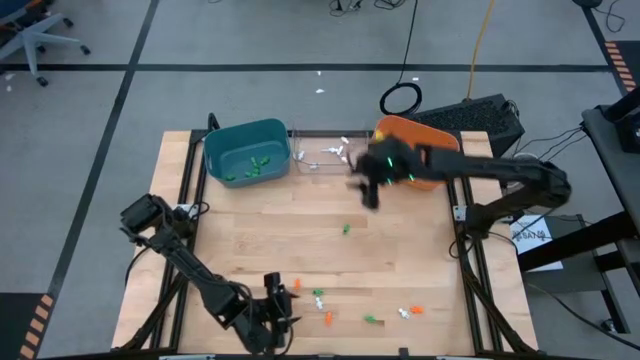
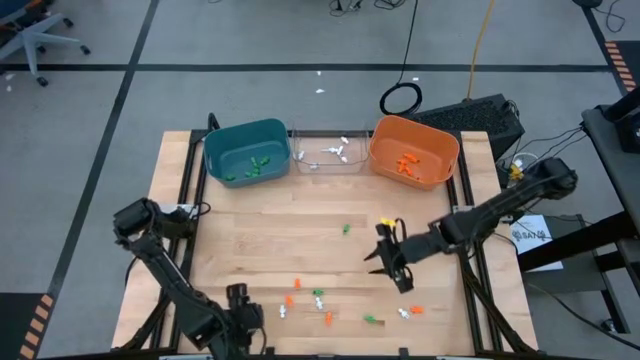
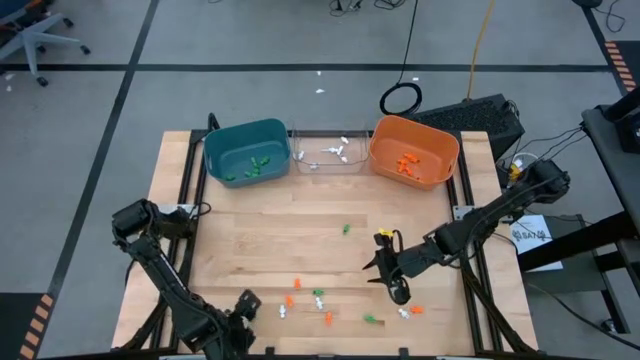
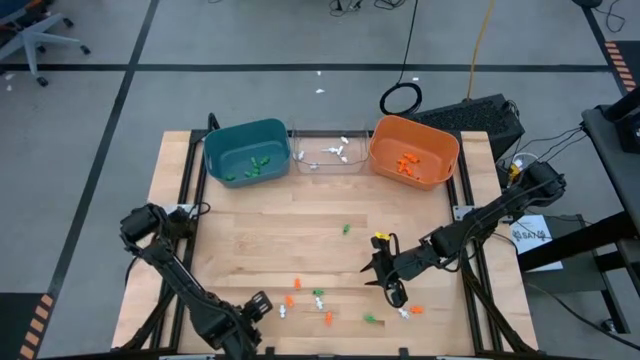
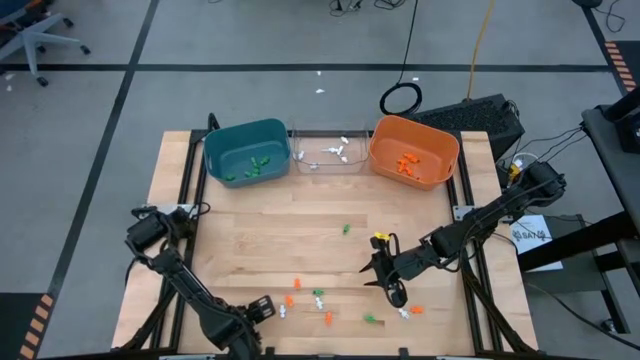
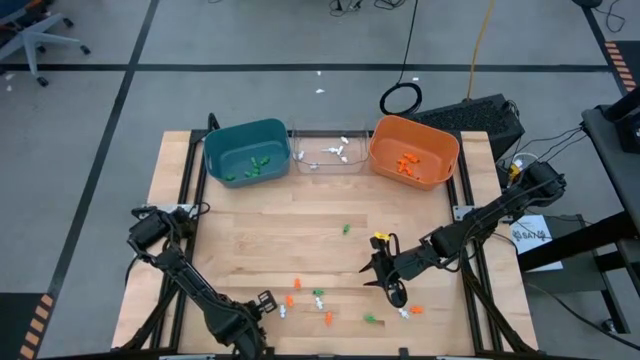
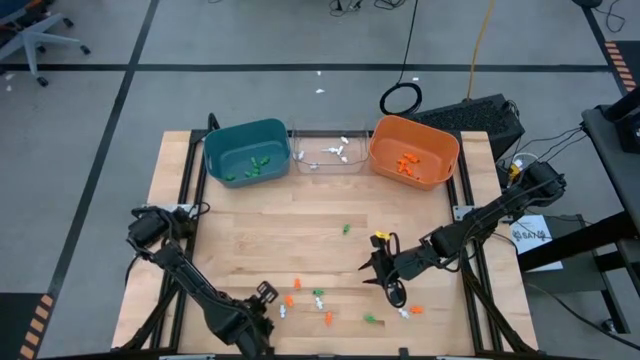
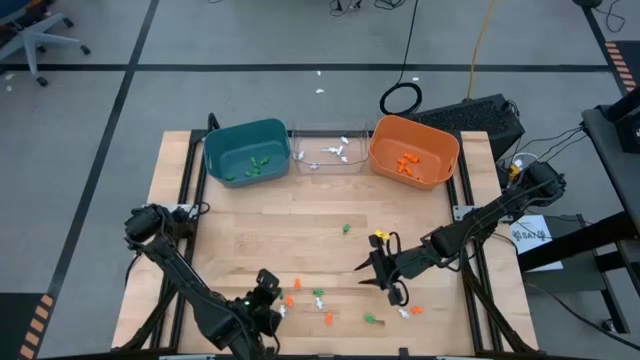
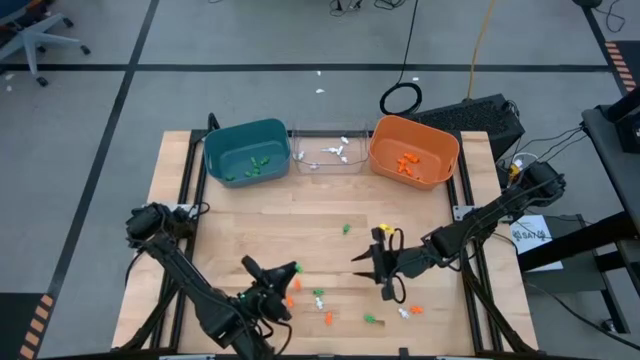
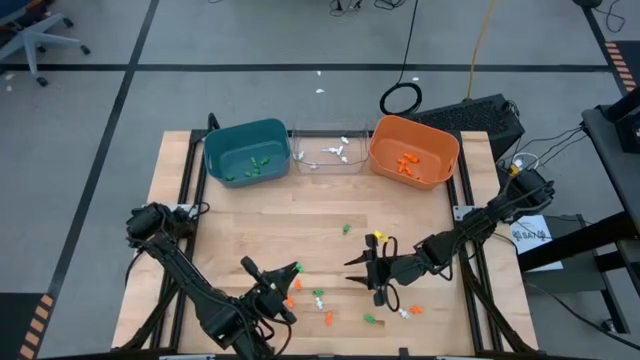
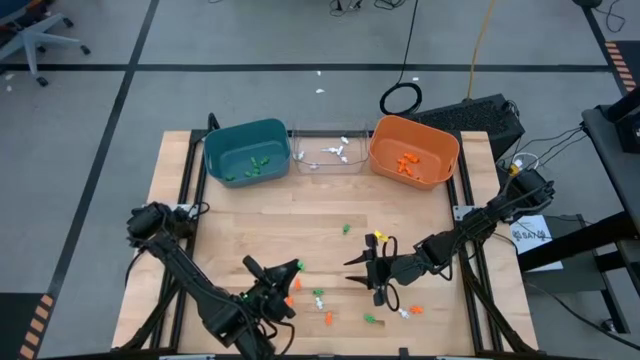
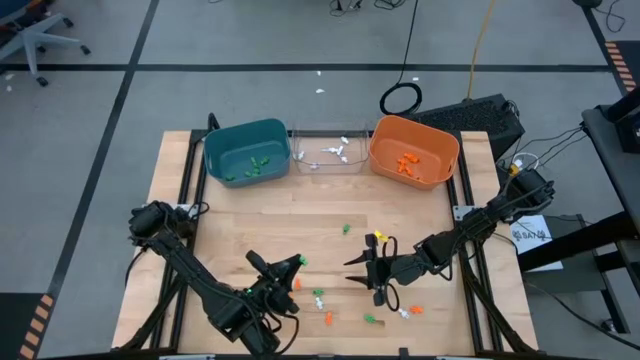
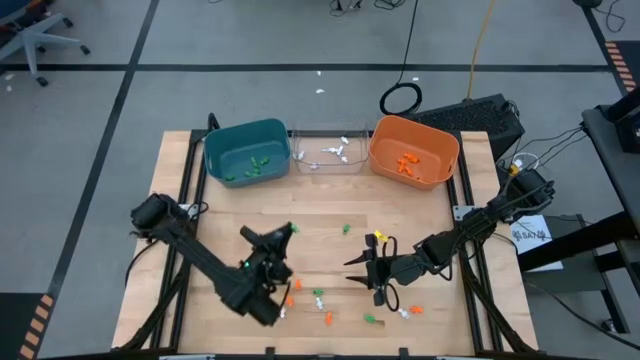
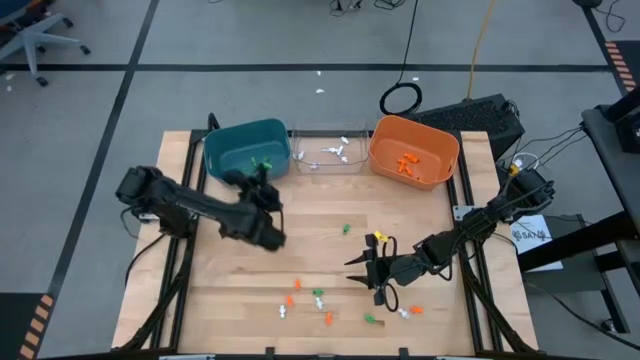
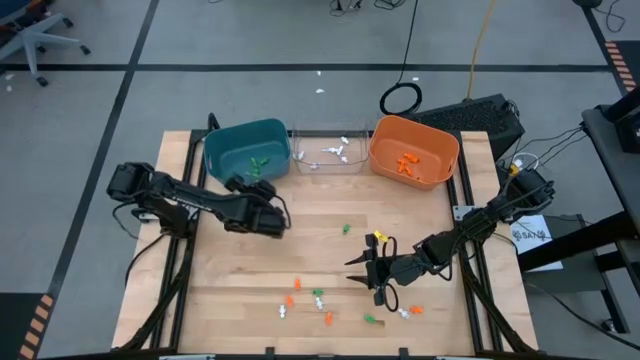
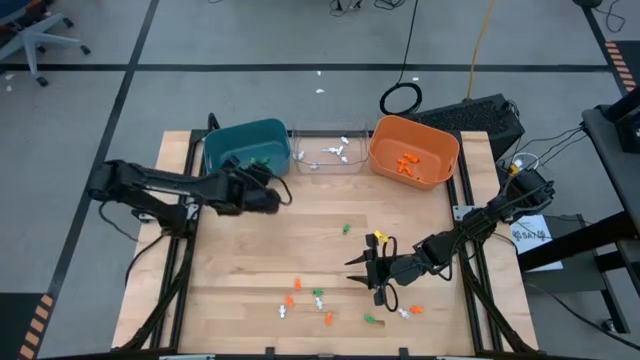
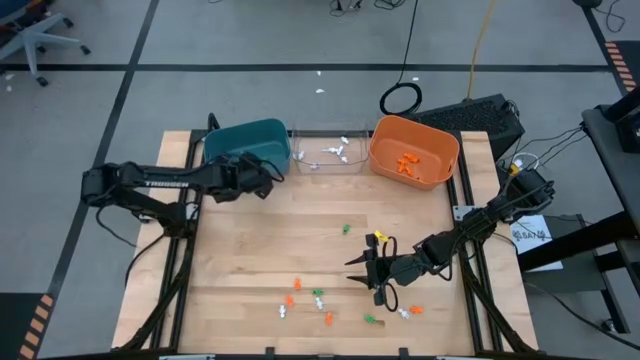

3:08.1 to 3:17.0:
Task: Sort Halloween decoration
Put the green skeleton toy into the blue bin

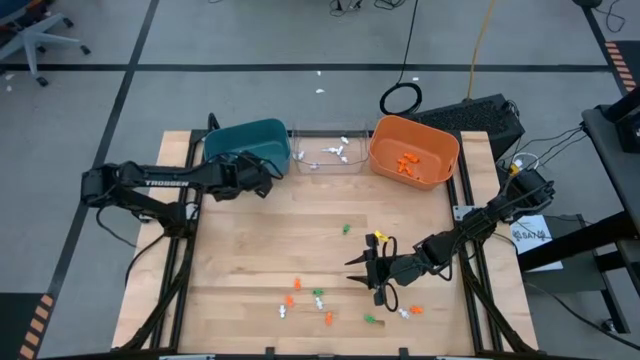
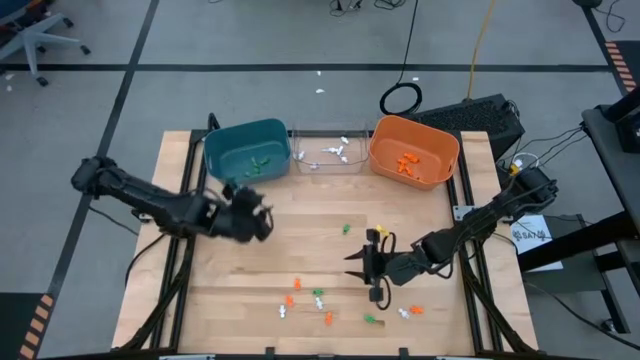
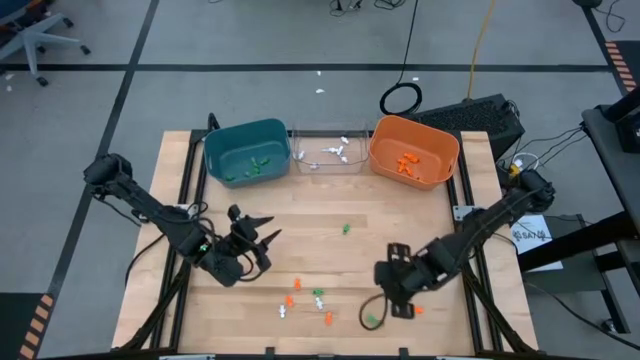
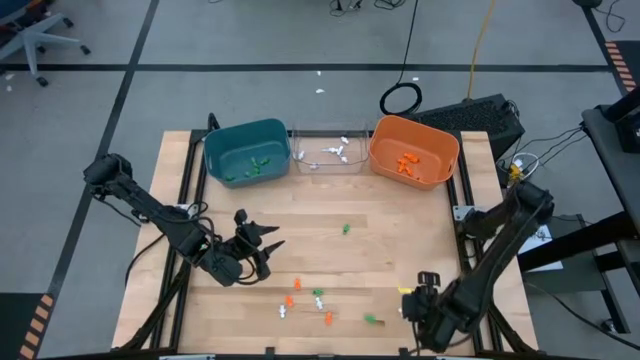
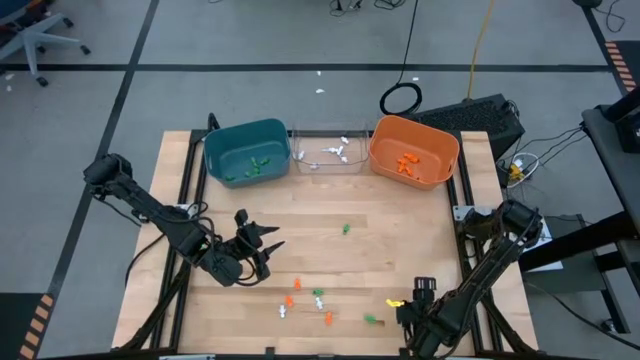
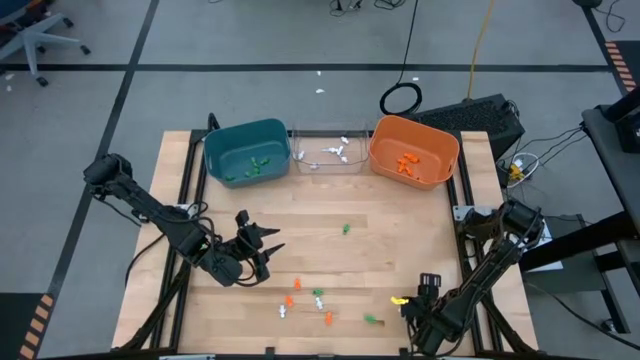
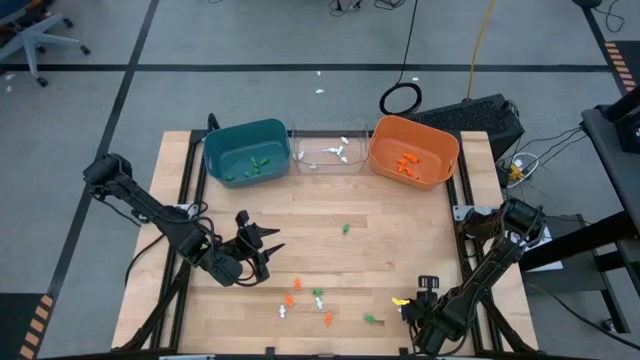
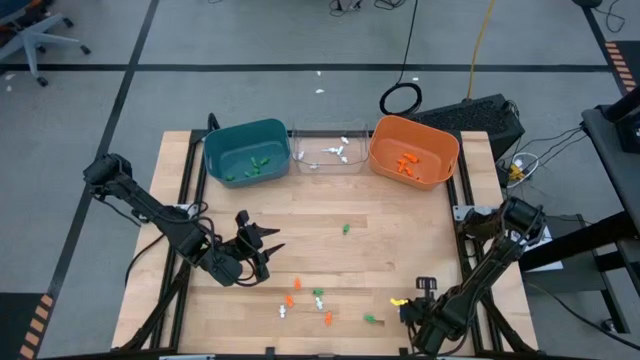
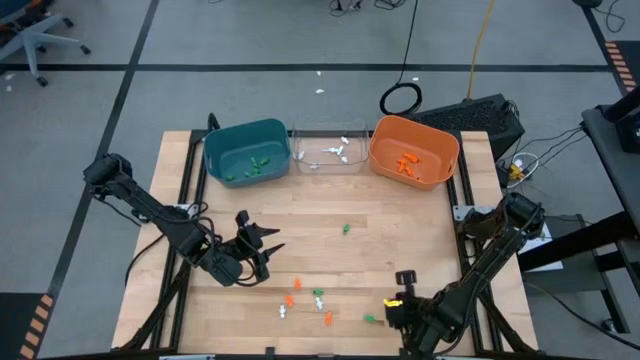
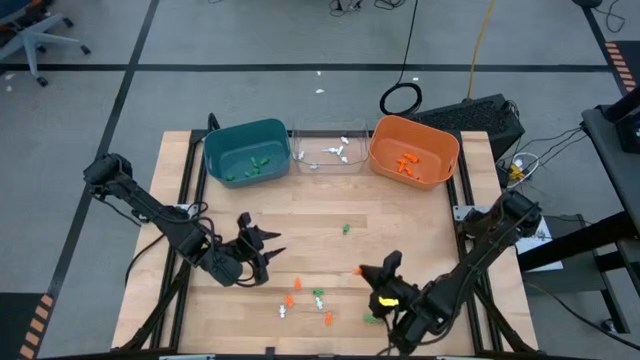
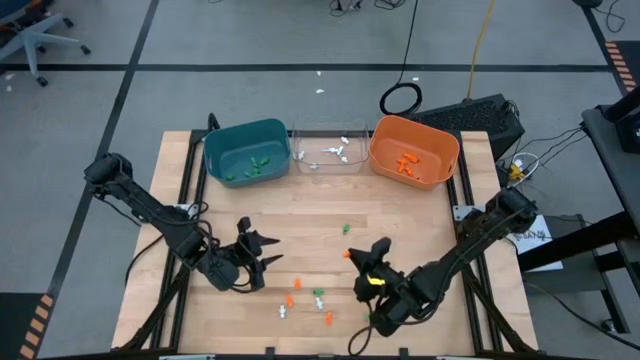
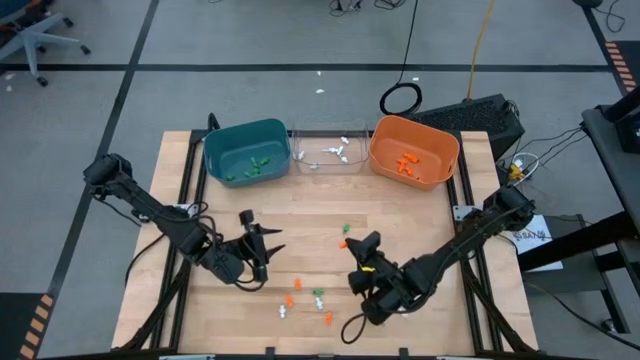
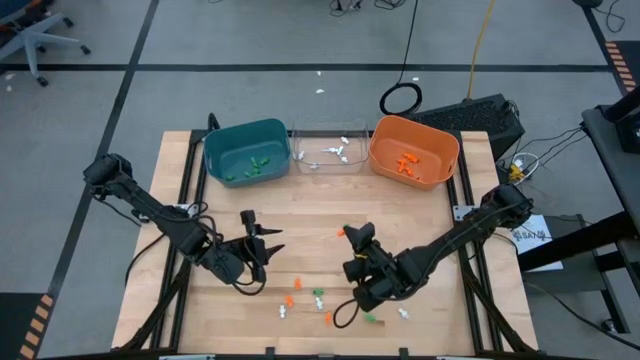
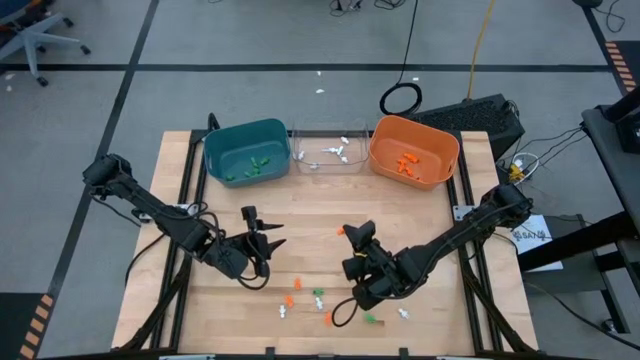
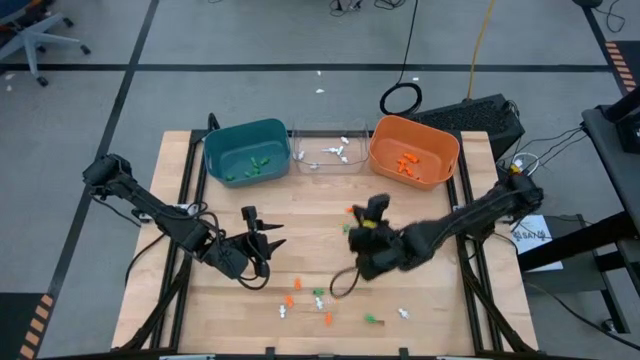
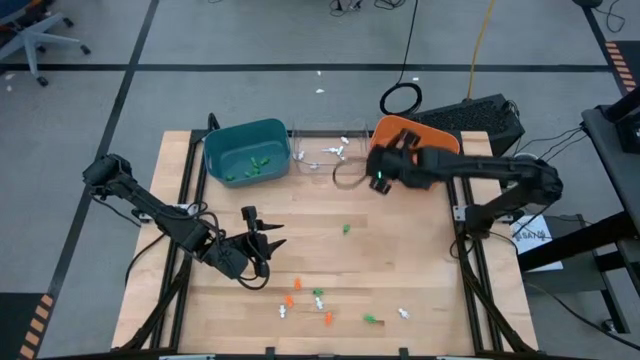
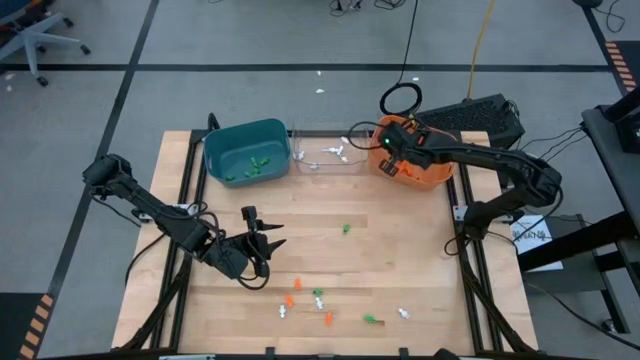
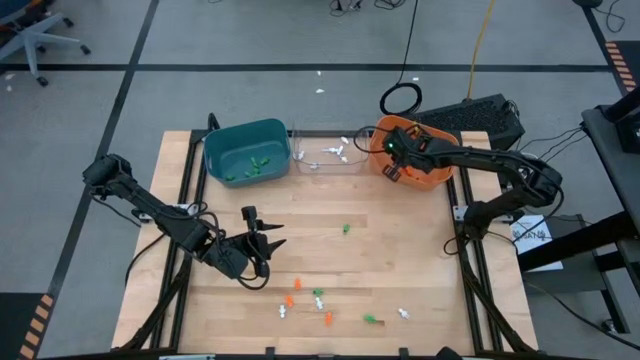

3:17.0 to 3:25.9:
Put the orange skeleton toy into the orange bin

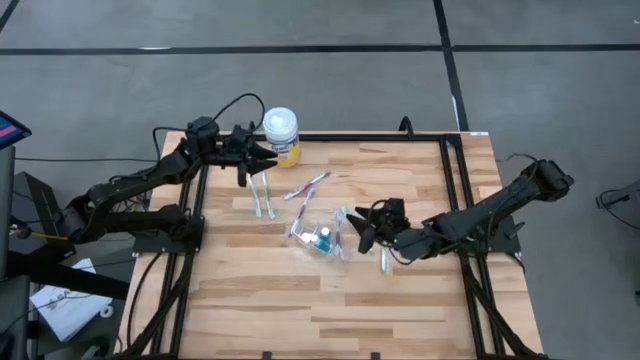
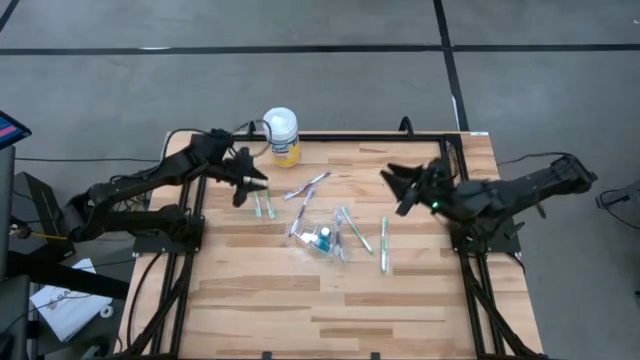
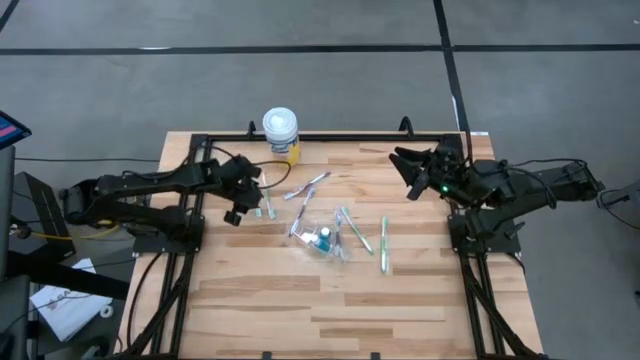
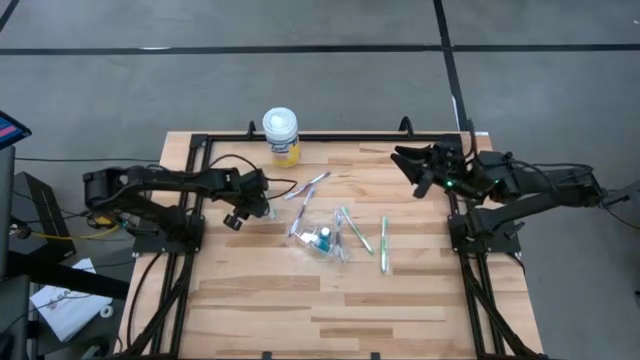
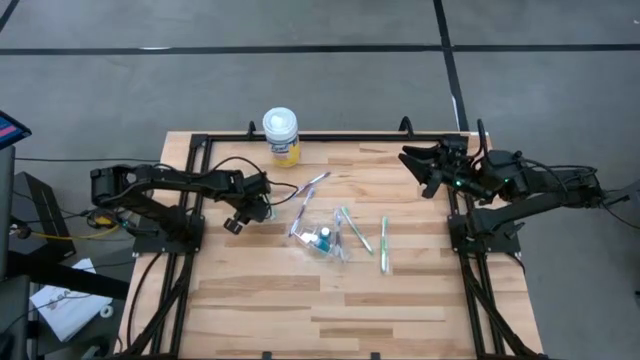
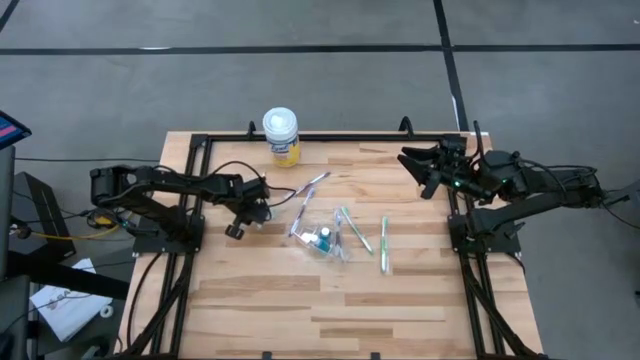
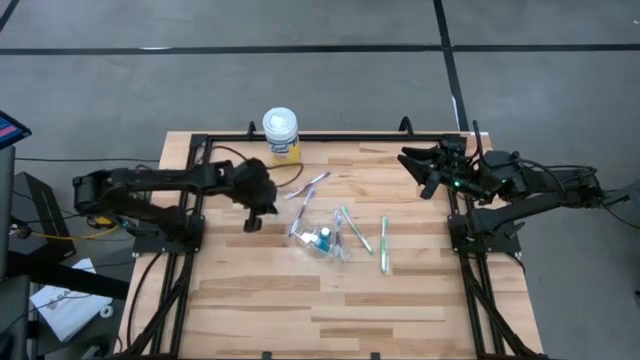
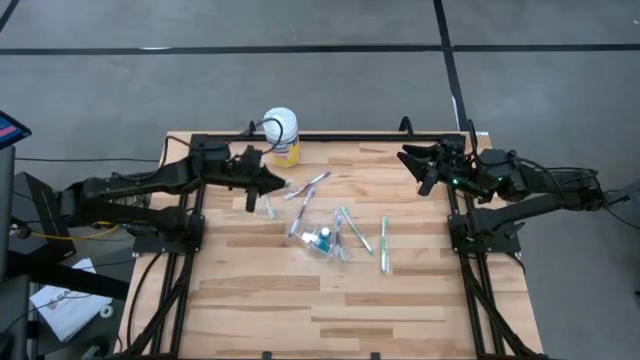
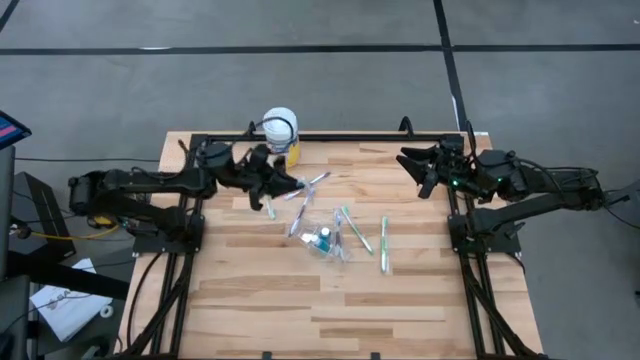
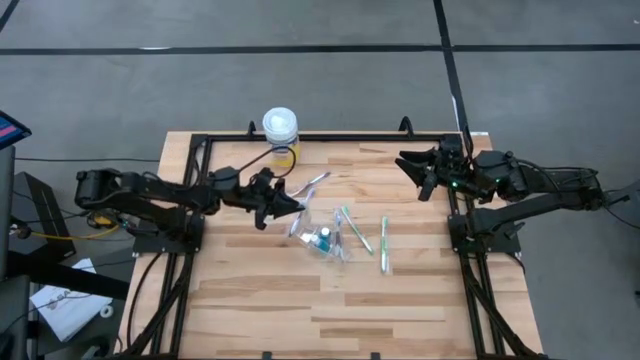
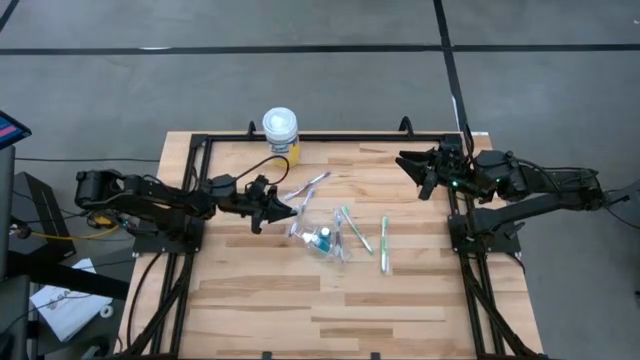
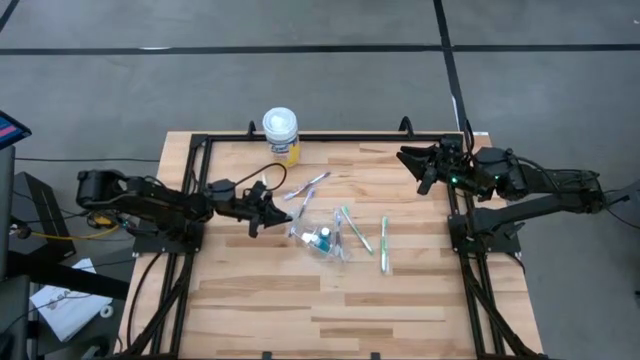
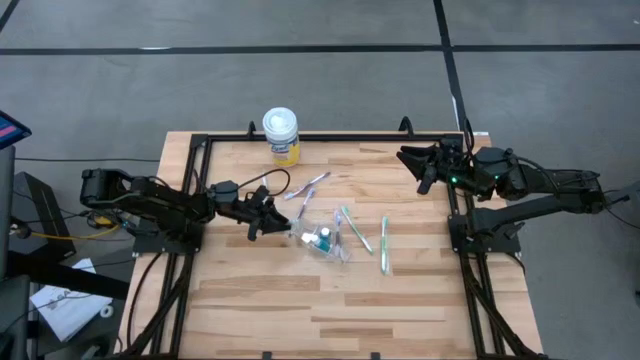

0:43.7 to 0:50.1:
Task: Pick & Place toothbrushing station
Put the green toothbrush into the left compartment of the transparent organizer
